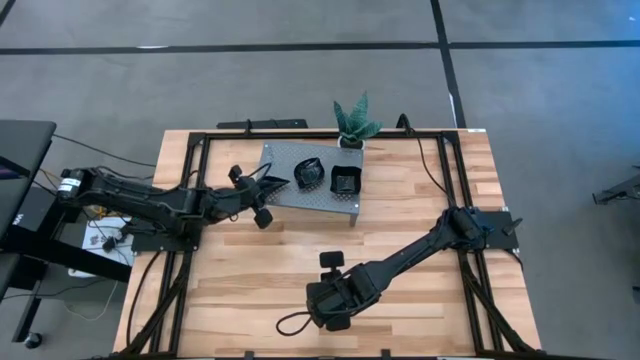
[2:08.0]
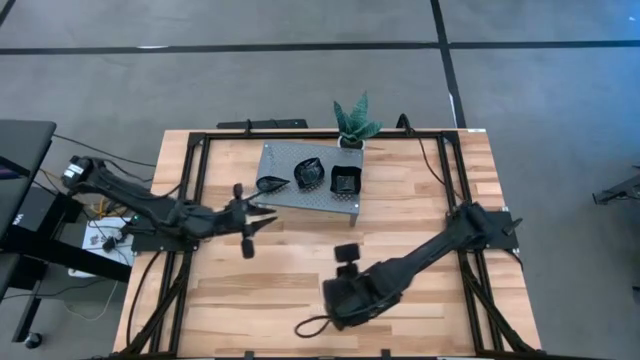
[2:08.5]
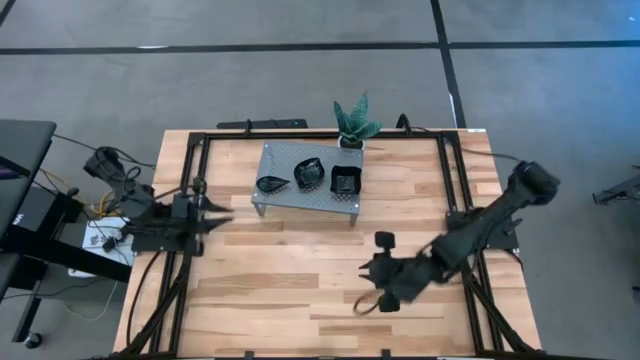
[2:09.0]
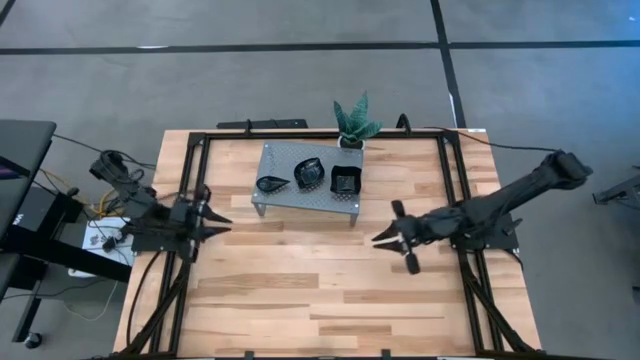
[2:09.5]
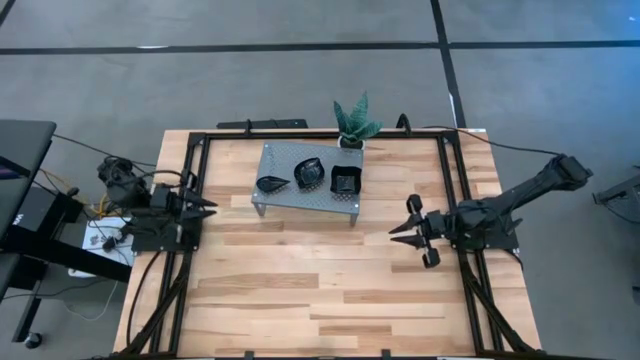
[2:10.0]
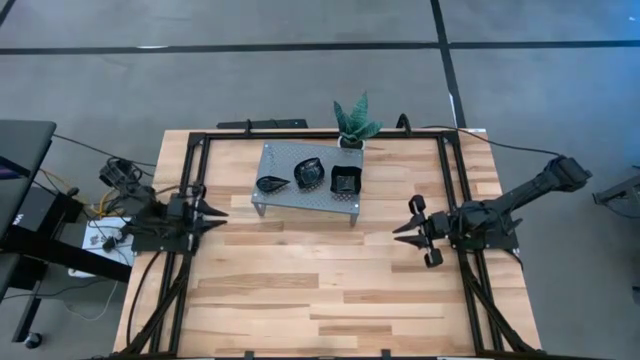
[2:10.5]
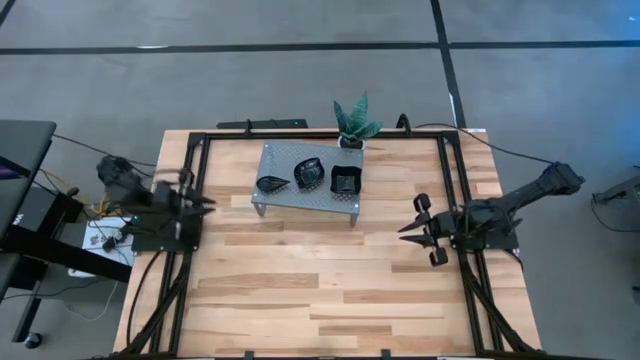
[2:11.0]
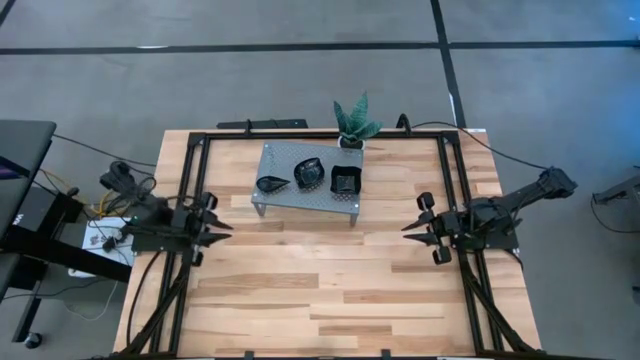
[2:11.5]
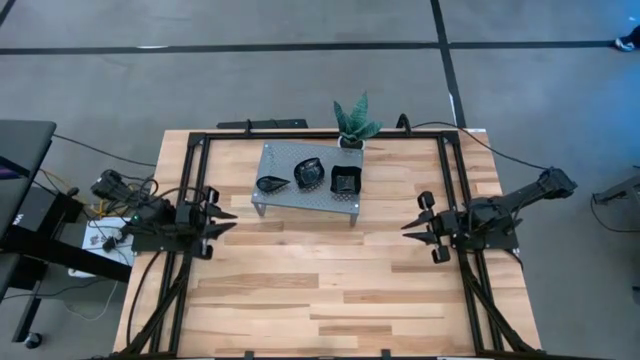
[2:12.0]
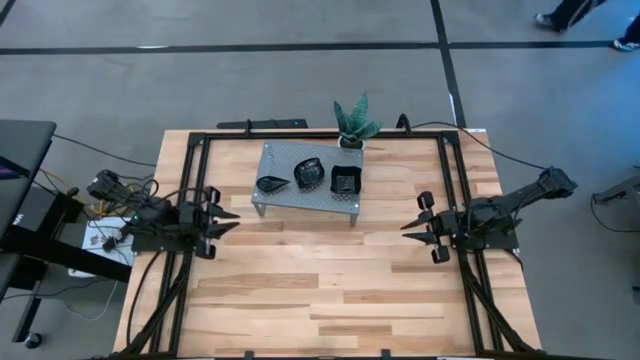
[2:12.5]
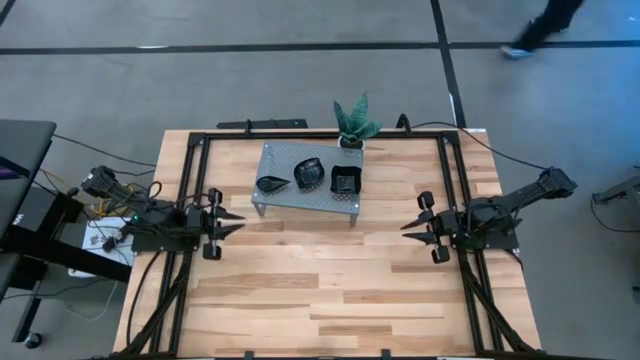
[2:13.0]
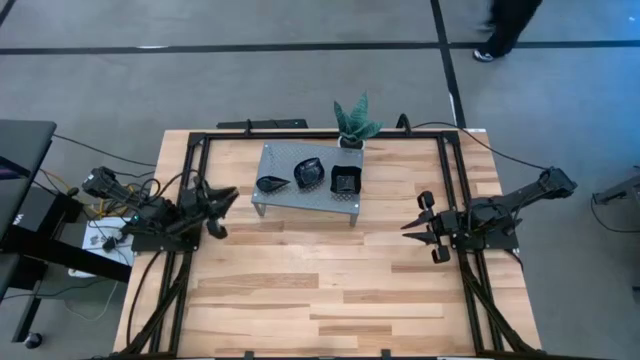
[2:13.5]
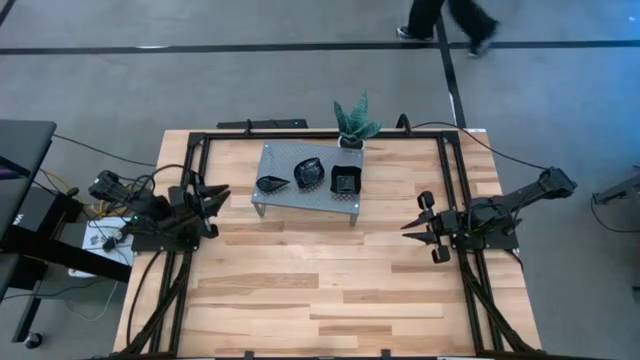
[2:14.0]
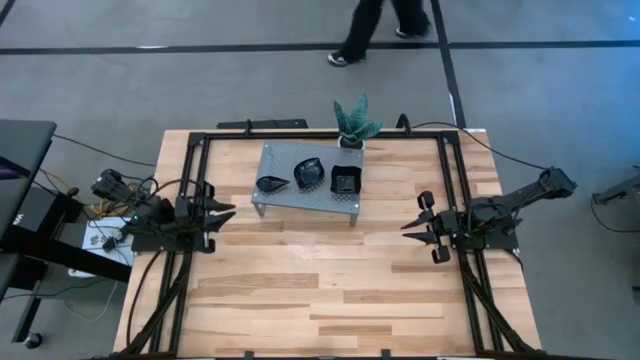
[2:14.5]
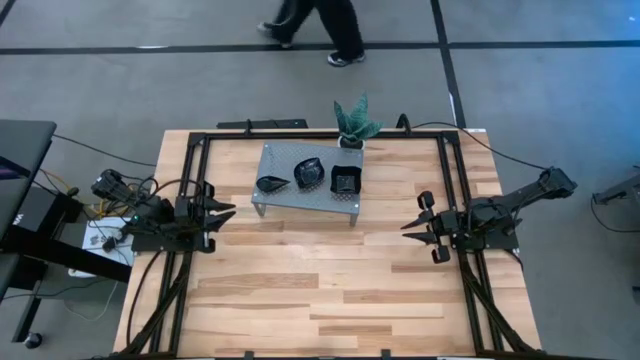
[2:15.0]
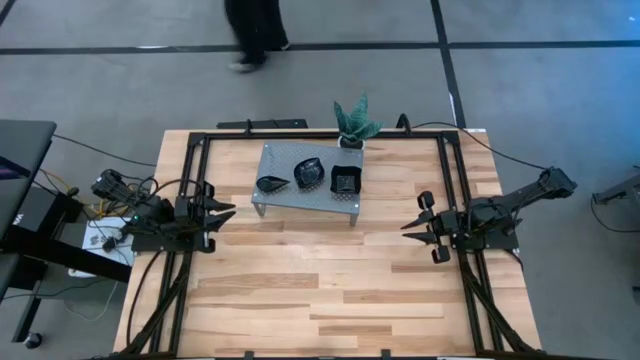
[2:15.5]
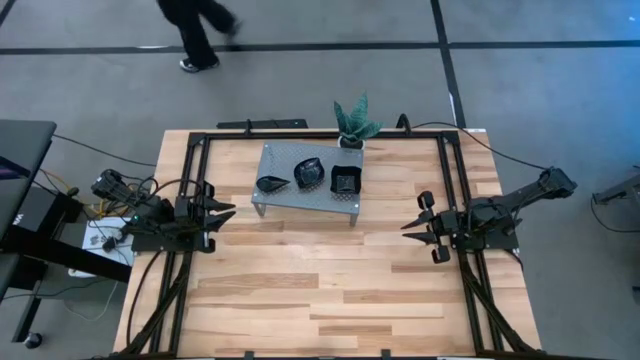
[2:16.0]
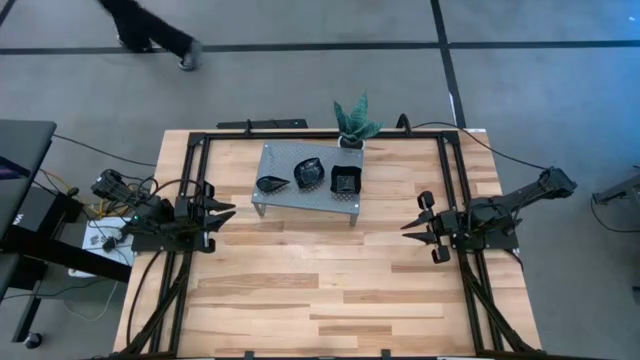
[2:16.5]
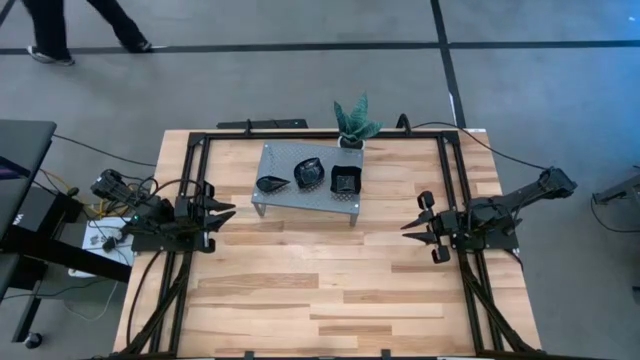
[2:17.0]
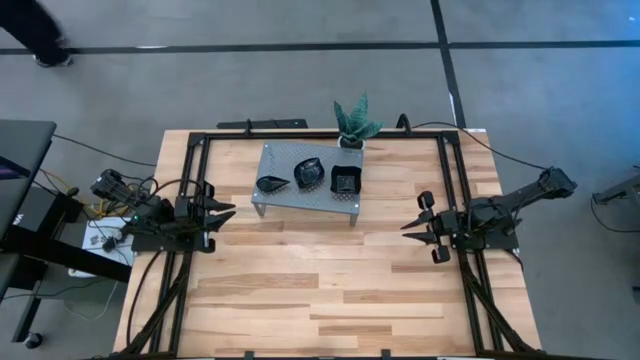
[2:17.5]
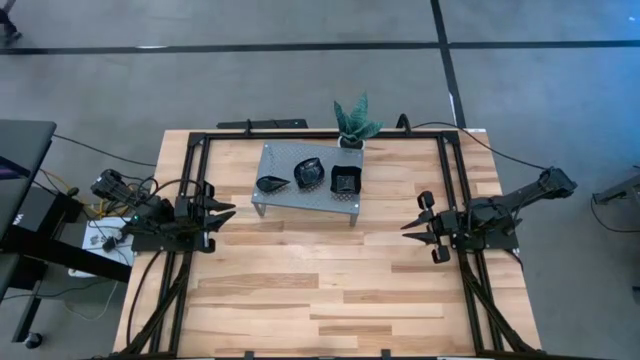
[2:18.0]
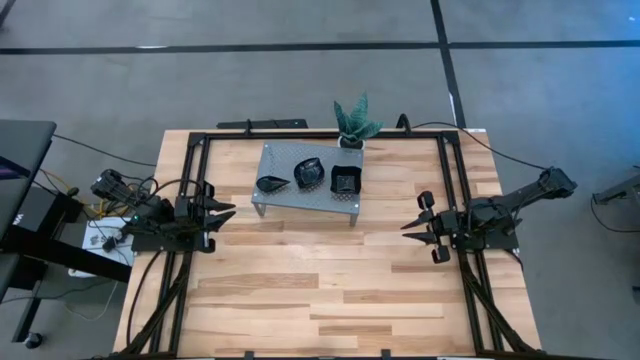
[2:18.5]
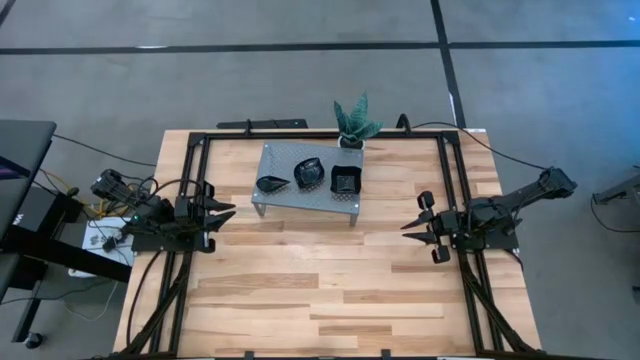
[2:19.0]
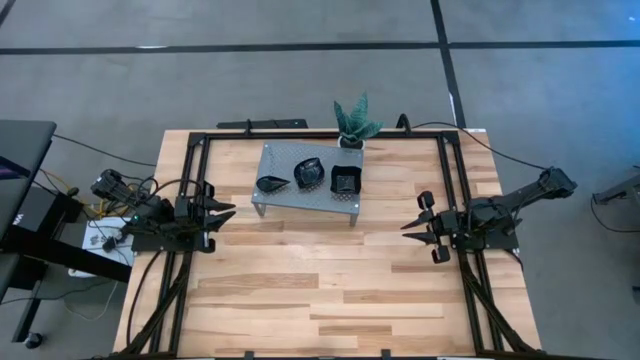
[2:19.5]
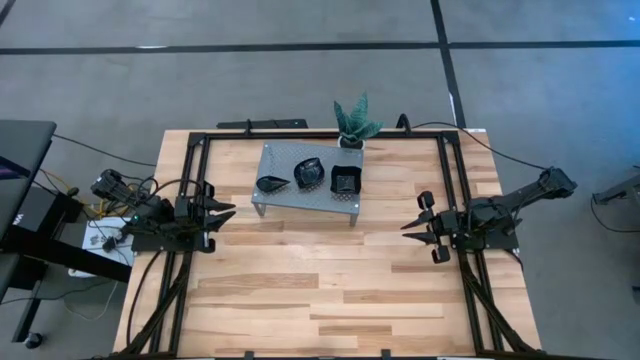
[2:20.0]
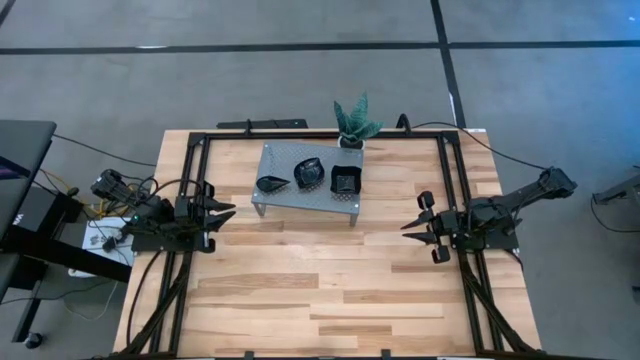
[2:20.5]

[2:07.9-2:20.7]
Task: Pick & Place Mini shaped plates
Return to Home Position

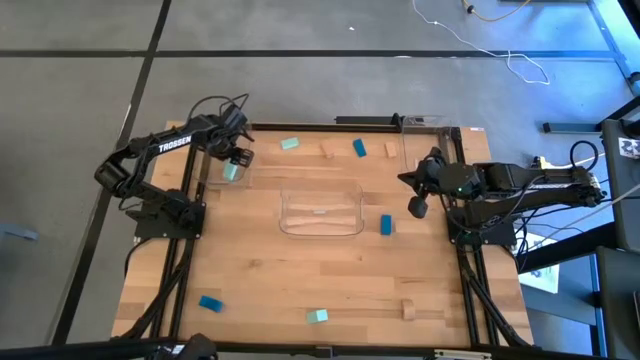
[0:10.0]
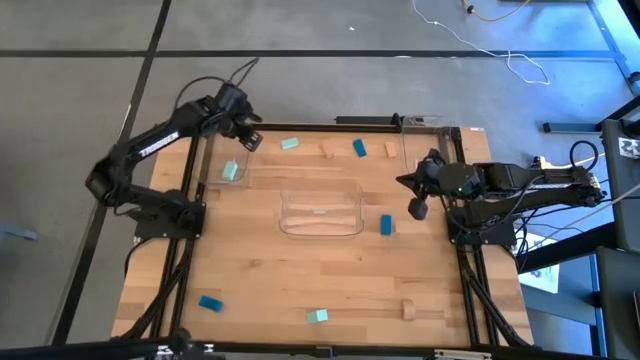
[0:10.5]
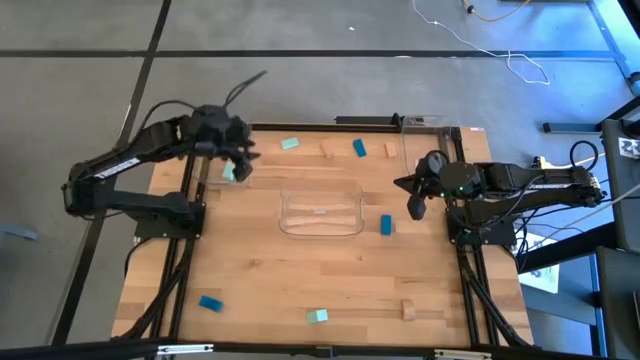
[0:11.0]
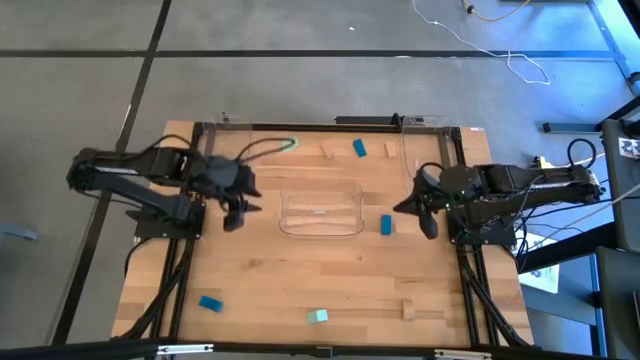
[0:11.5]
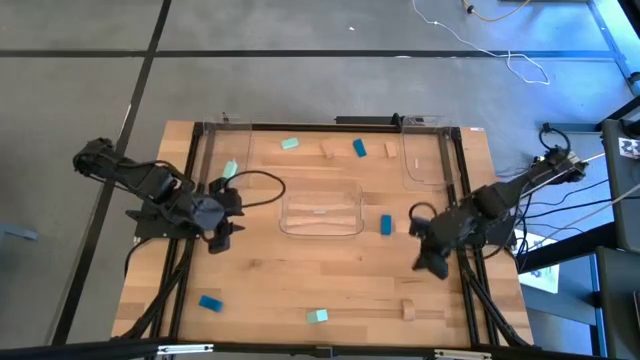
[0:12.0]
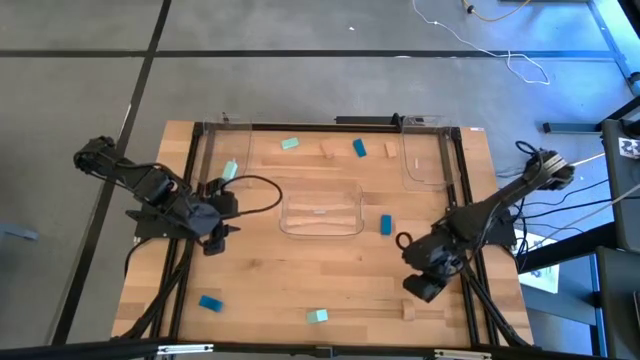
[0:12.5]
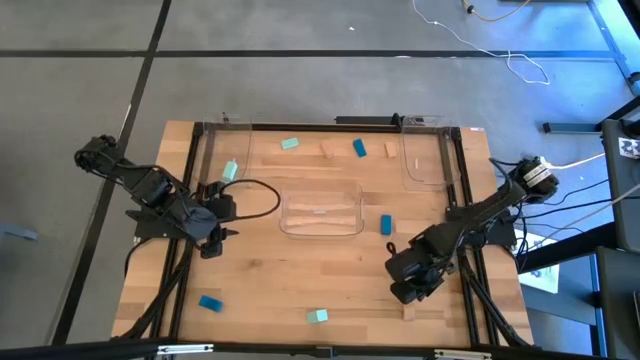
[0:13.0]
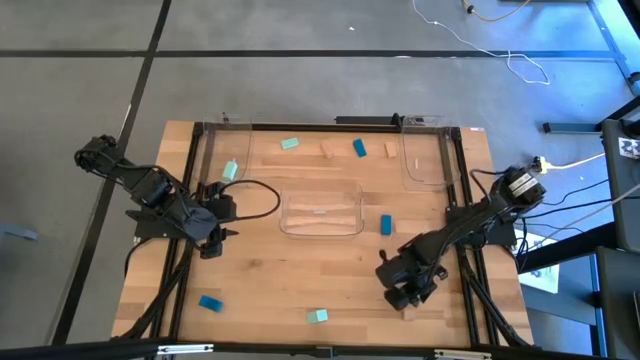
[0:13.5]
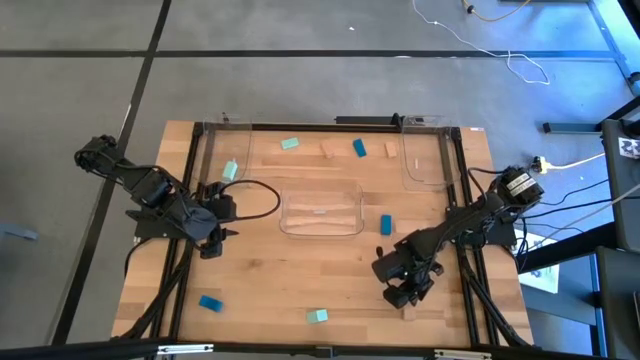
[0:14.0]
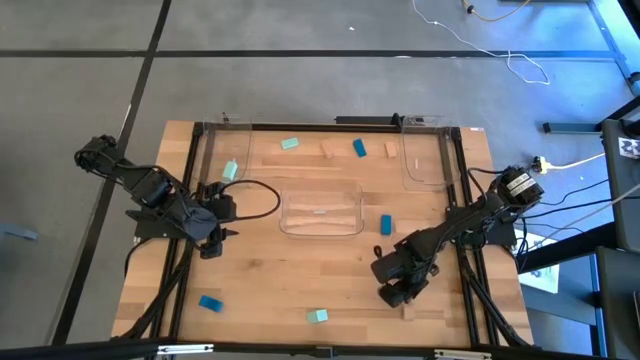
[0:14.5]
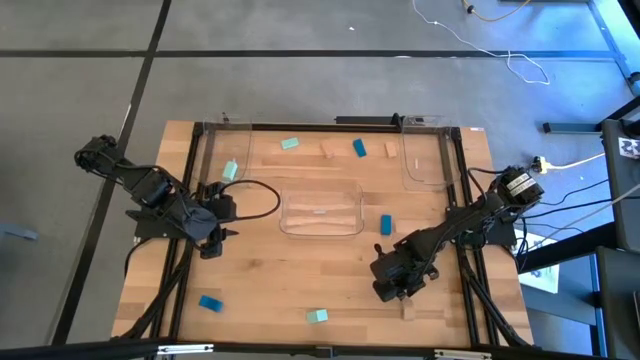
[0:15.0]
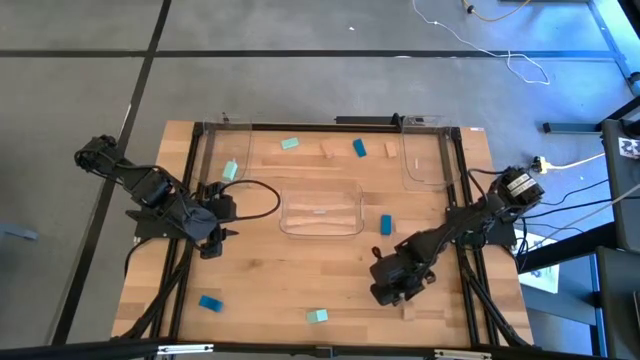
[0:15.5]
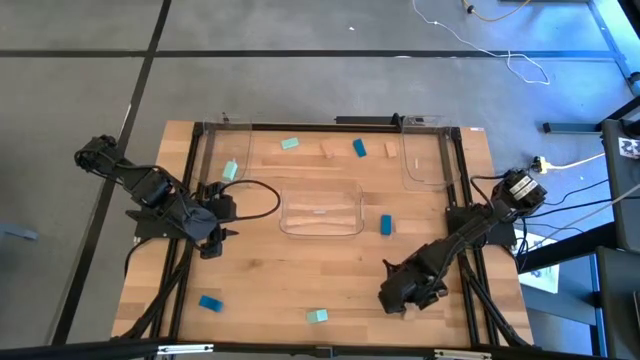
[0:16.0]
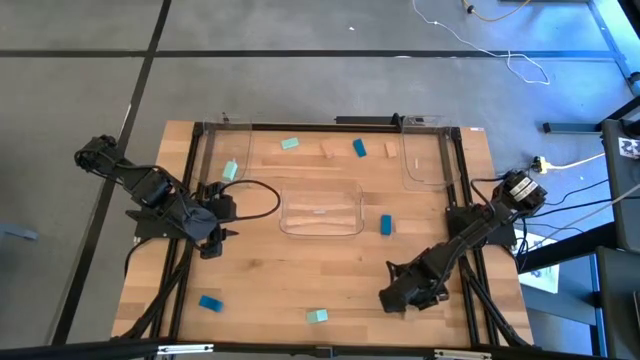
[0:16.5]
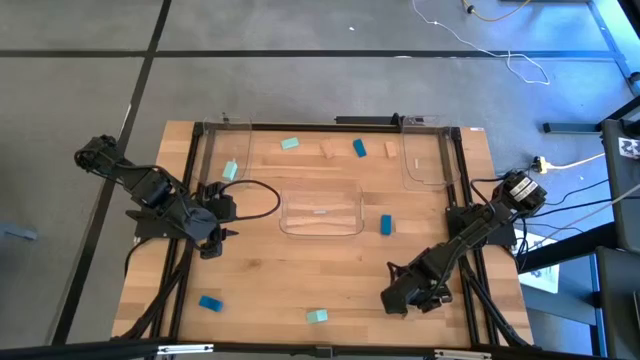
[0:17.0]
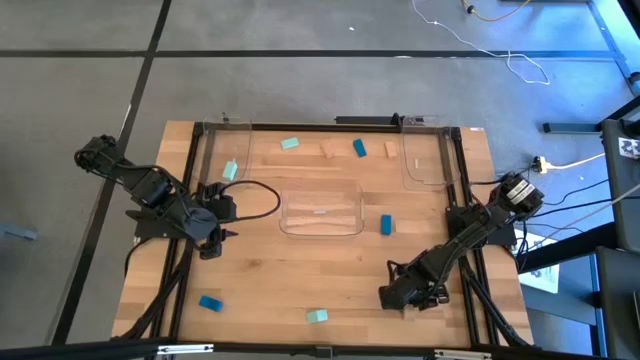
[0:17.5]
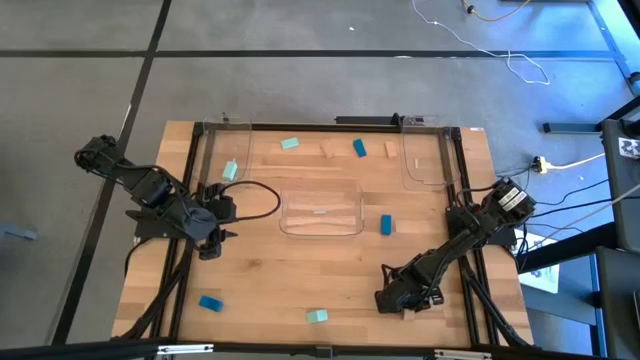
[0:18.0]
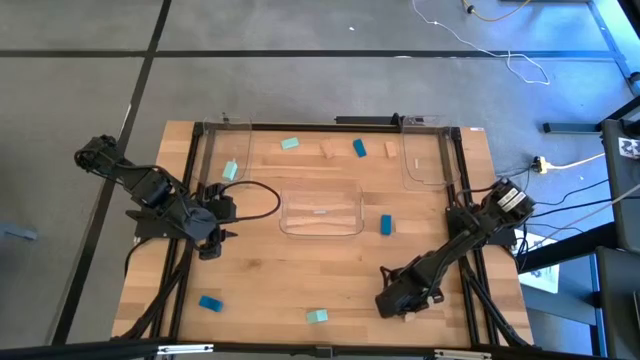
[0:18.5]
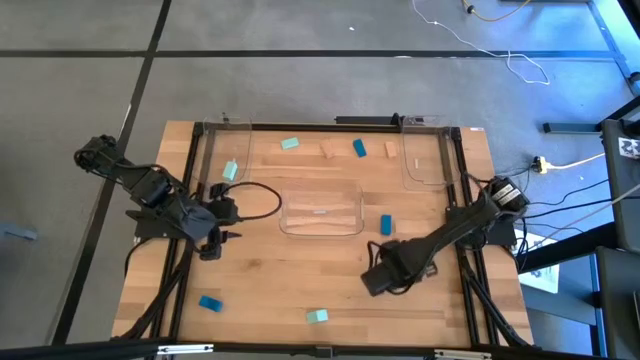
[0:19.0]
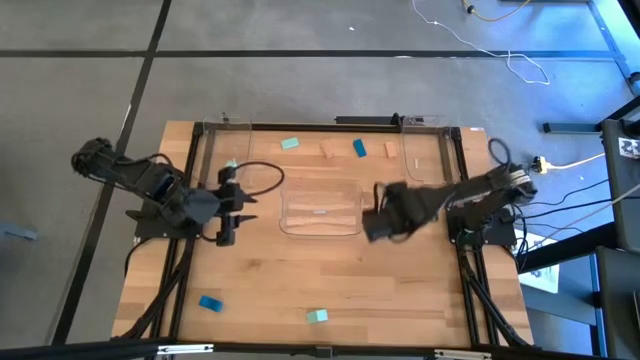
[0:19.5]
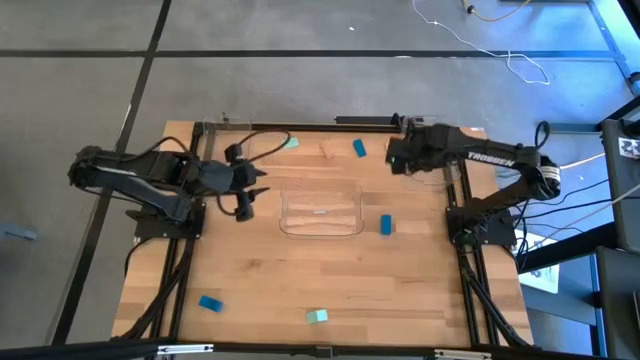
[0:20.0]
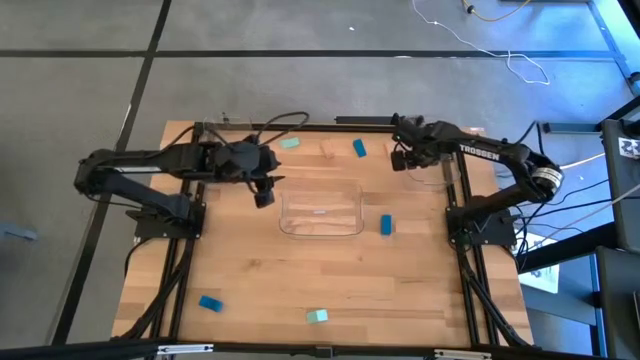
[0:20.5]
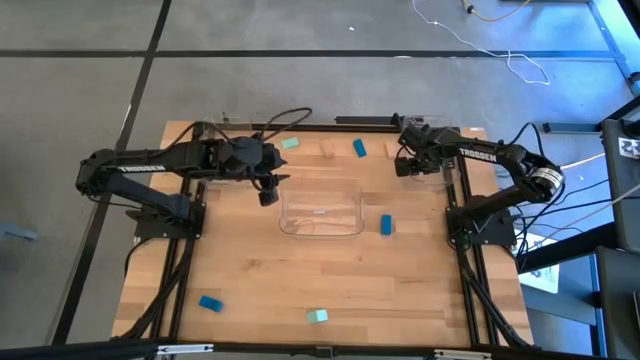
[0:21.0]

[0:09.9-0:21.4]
Task: Sort & place blocks by color
Put the bottom brown block into the top right transparent bin
